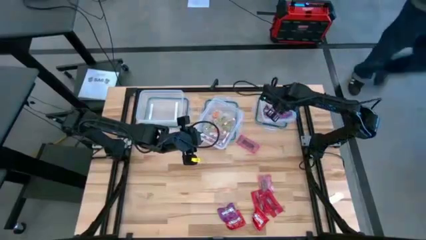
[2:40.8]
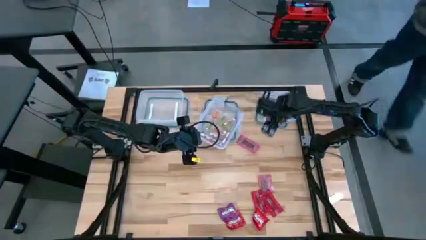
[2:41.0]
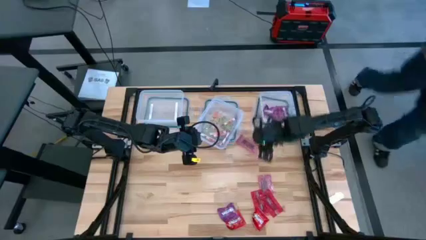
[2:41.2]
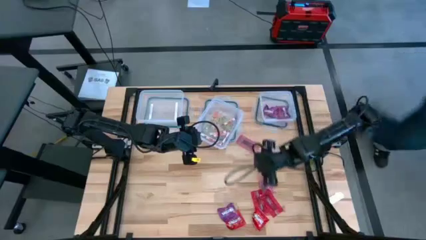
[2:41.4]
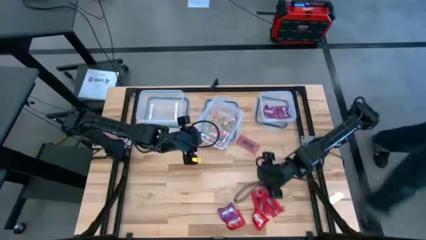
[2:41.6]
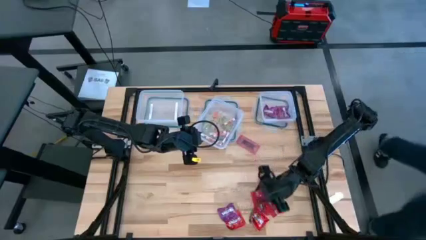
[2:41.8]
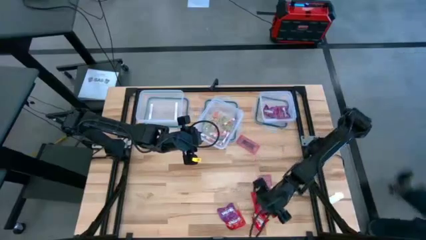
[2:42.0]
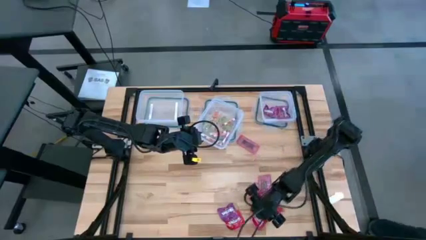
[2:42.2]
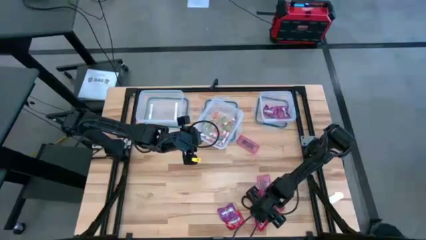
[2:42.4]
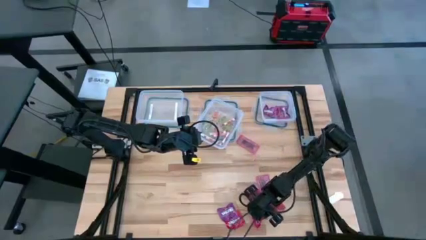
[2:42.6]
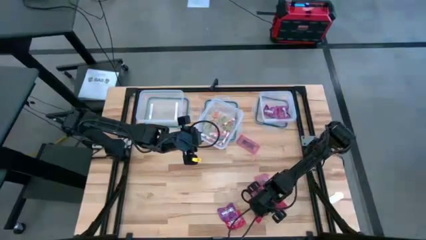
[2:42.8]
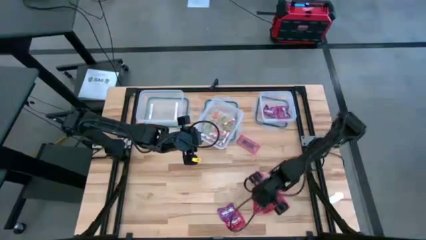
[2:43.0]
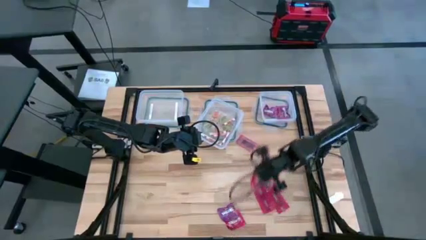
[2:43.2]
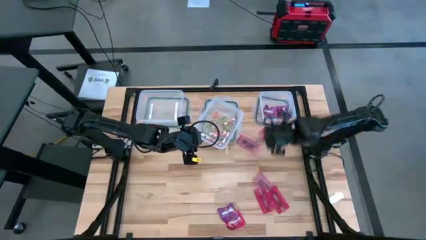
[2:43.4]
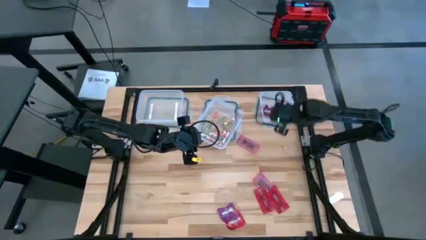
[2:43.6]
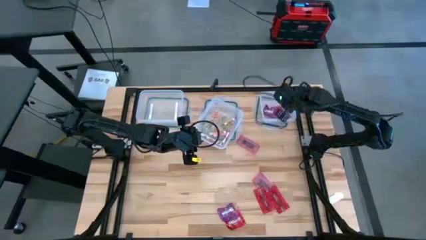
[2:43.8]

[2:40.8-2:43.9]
Task: Sort candy
Put the bottom center red candy into the right transparent bin

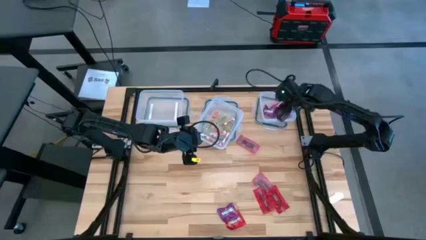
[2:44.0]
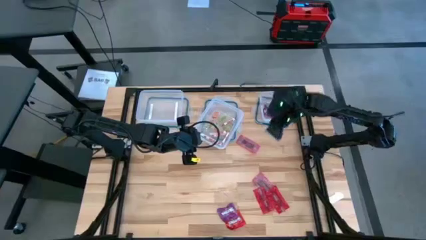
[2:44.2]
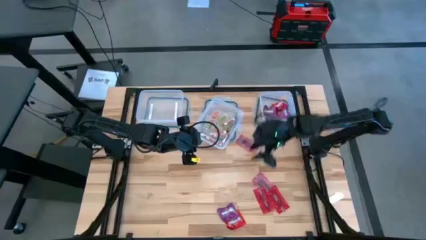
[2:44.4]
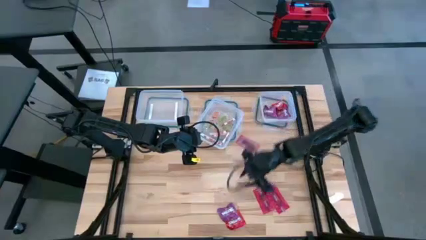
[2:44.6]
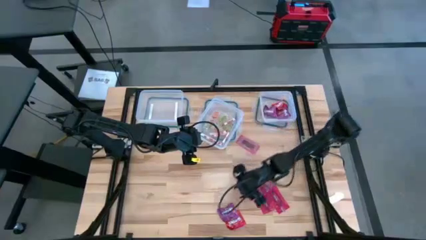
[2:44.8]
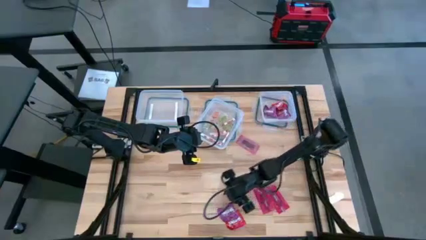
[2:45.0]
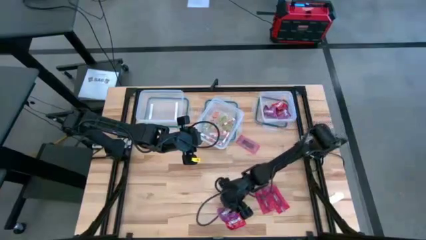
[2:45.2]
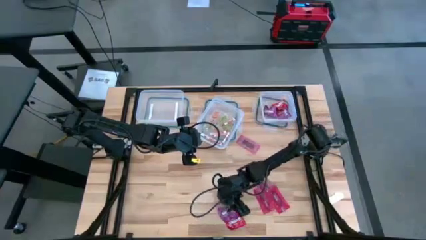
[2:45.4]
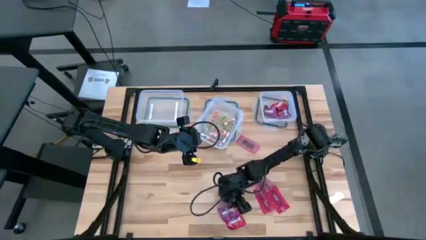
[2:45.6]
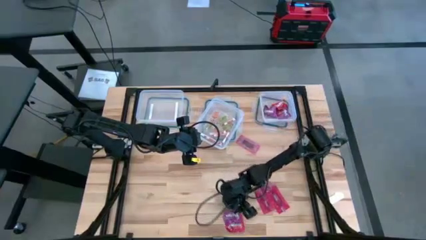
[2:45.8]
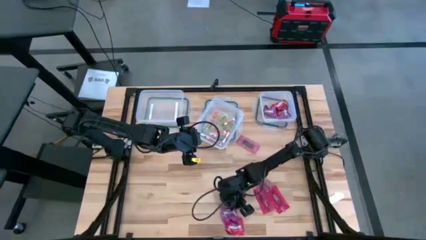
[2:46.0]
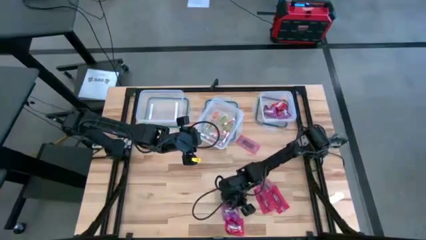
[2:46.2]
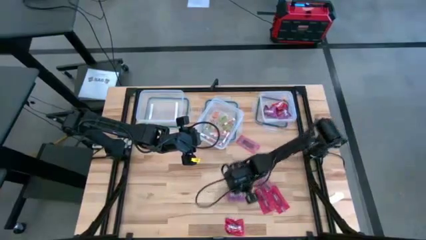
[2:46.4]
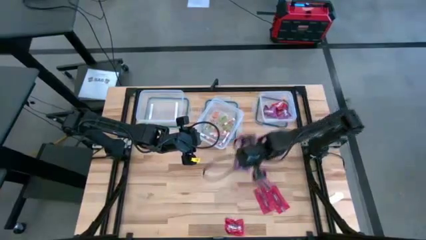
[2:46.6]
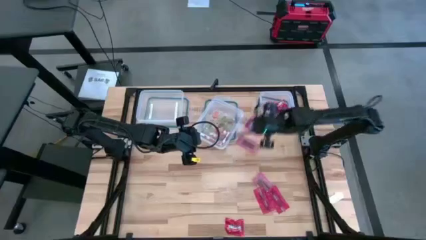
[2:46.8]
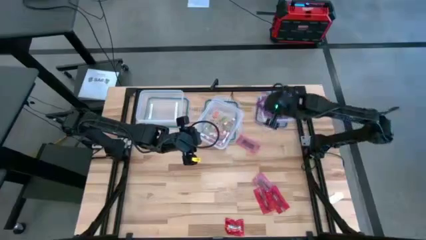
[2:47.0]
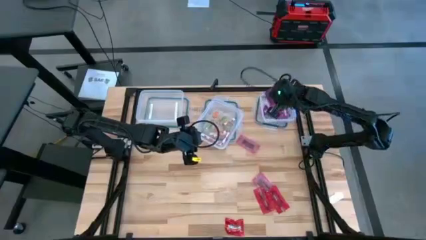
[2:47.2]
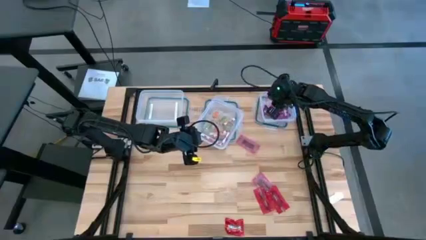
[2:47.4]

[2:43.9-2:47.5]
Put the violet candy into the right transparent bin

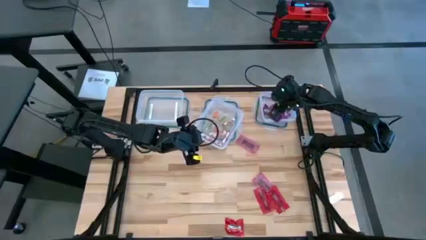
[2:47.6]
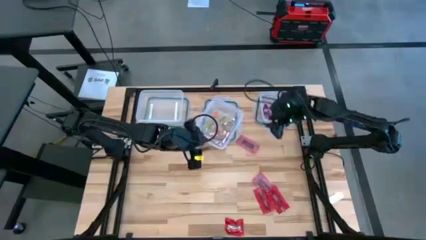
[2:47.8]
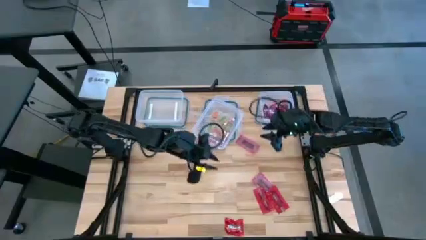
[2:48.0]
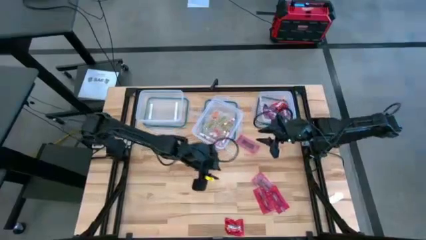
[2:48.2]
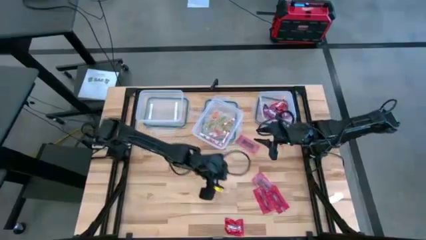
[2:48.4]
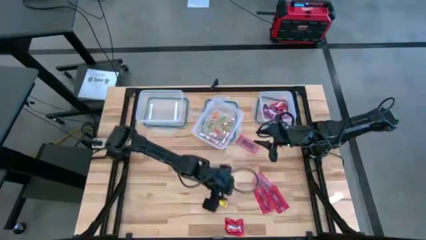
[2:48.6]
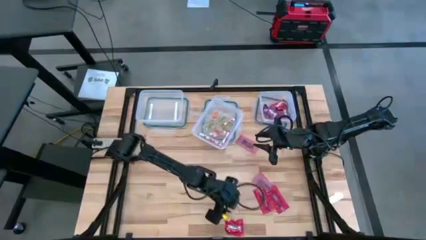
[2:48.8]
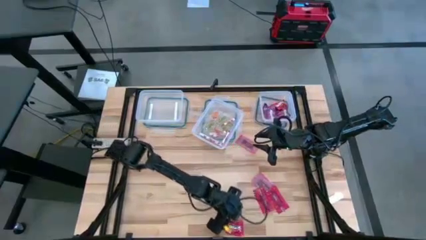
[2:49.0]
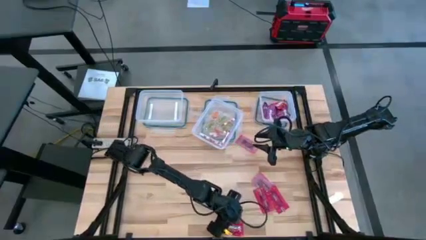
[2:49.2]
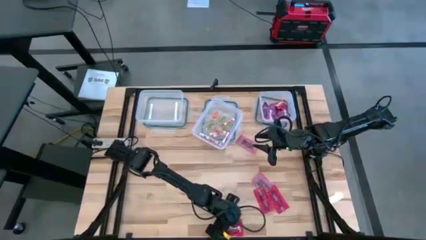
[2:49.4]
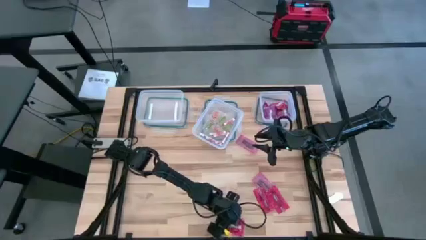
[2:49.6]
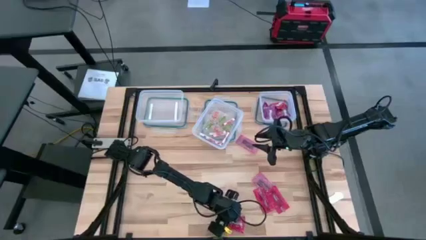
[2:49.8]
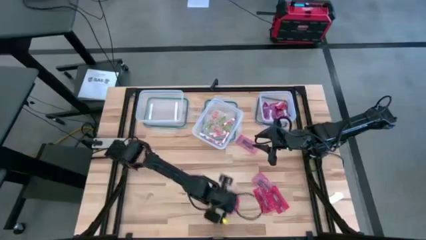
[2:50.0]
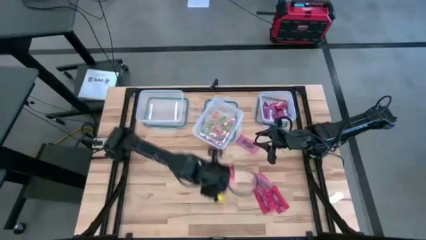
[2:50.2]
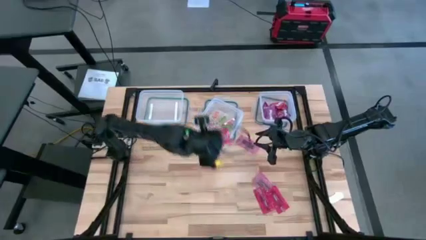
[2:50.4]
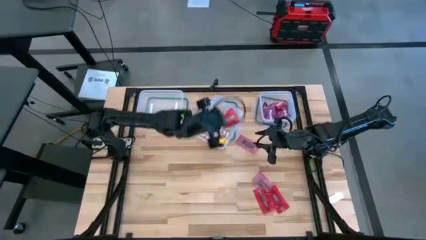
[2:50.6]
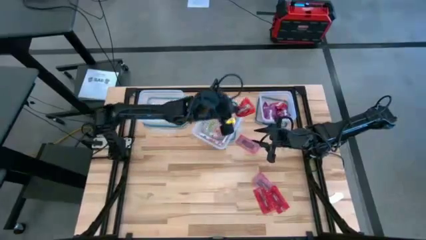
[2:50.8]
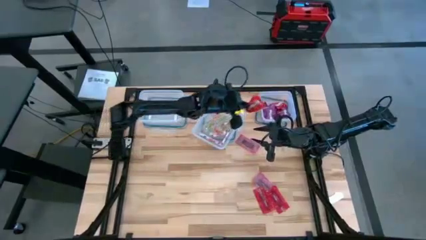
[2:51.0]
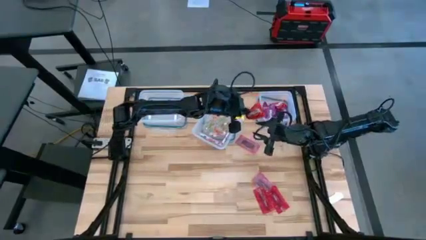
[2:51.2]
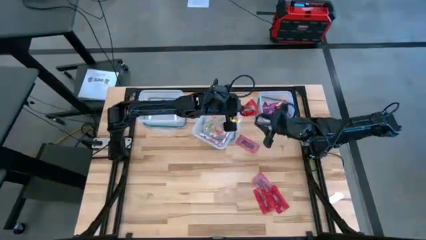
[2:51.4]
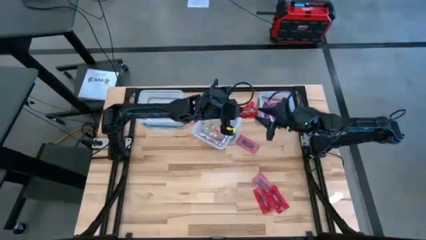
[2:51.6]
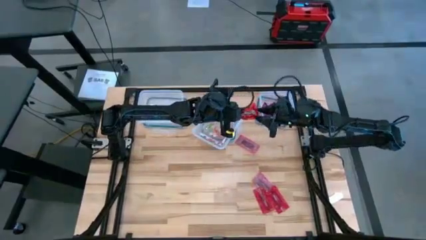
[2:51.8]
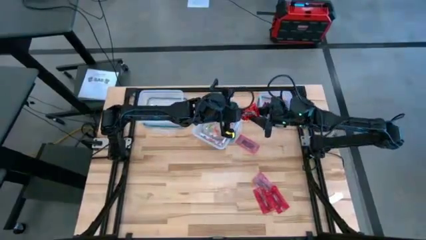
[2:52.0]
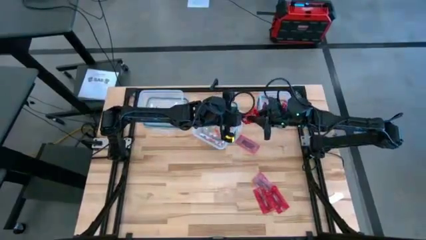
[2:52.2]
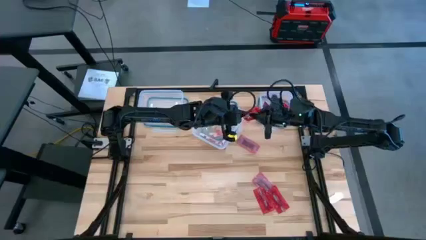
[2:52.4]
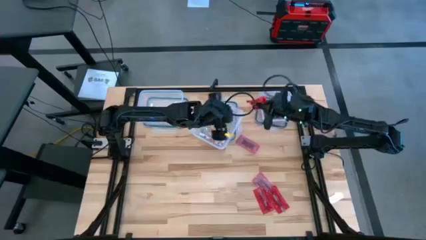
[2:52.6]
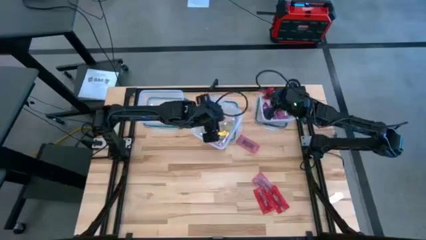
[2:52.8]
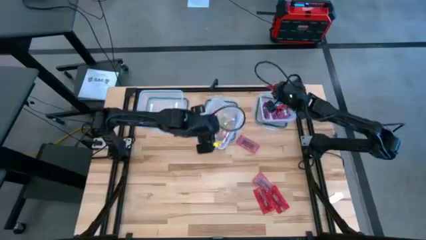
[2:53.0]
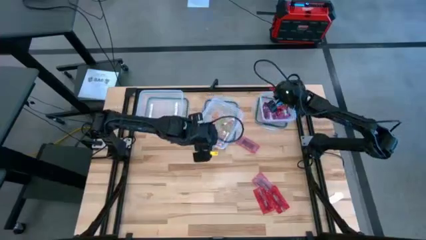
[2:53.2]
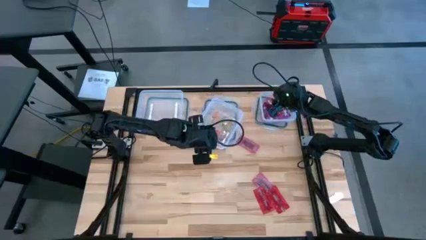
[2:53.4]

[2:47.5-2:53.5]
Put the middle left red candy into the right transparent bin

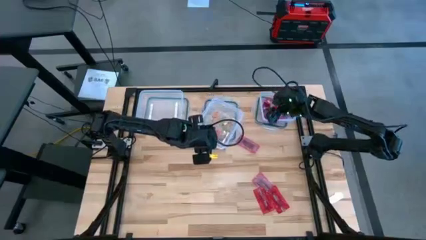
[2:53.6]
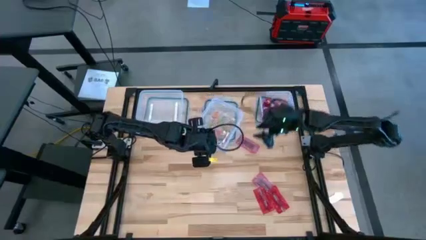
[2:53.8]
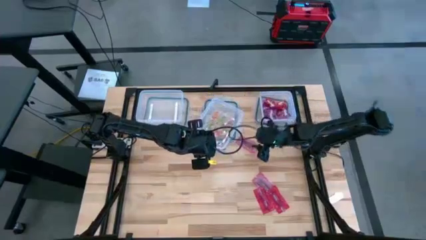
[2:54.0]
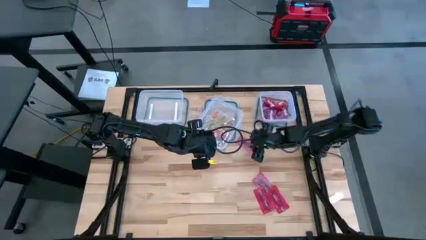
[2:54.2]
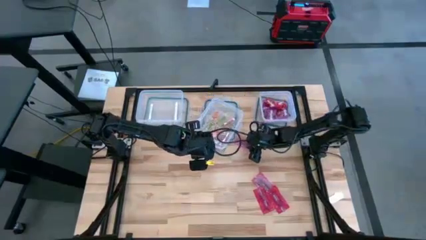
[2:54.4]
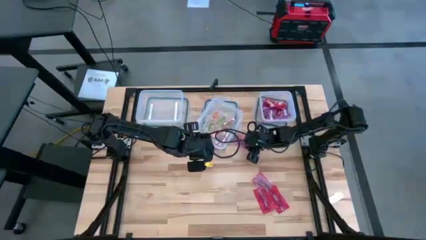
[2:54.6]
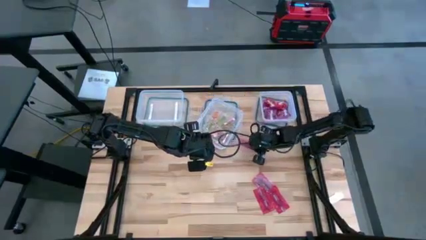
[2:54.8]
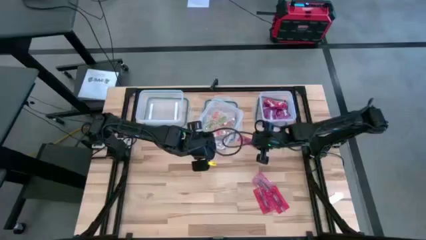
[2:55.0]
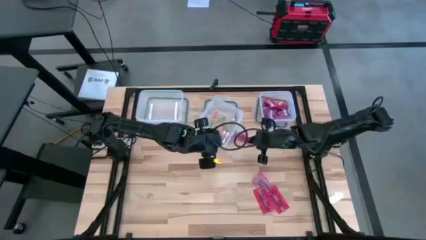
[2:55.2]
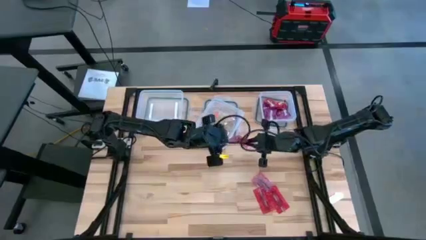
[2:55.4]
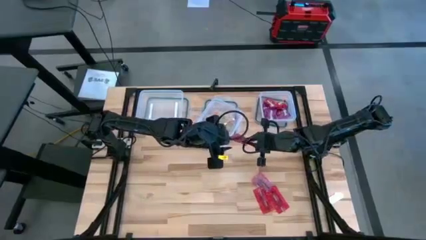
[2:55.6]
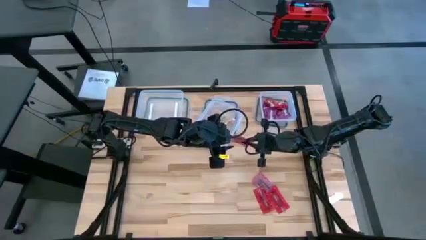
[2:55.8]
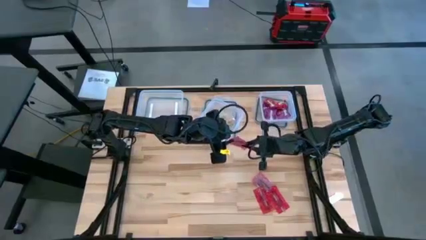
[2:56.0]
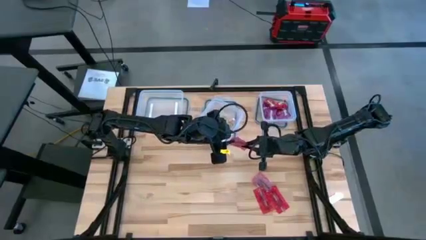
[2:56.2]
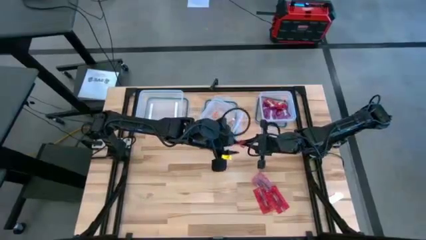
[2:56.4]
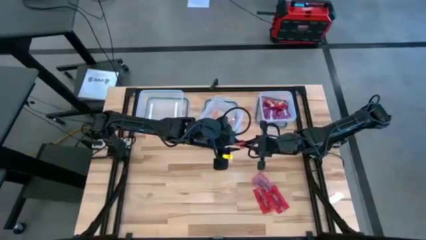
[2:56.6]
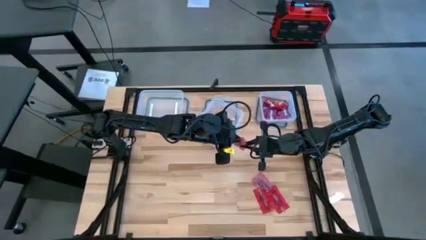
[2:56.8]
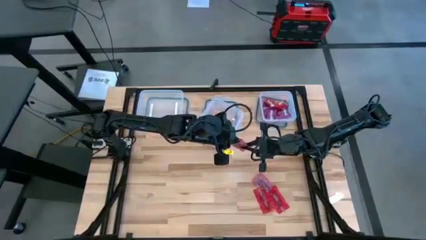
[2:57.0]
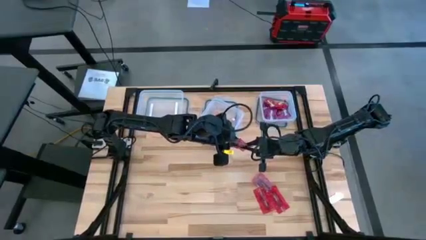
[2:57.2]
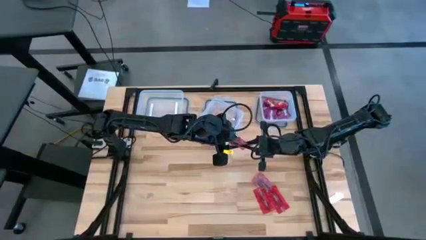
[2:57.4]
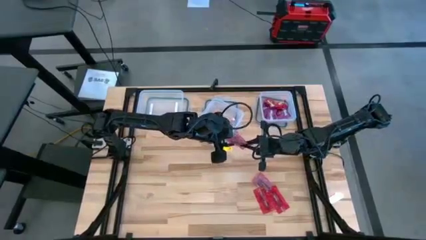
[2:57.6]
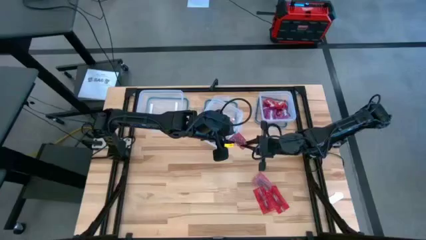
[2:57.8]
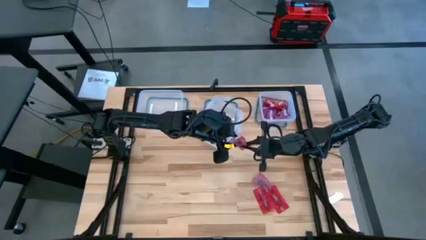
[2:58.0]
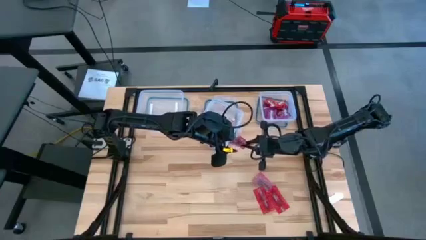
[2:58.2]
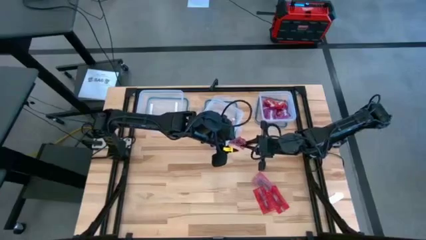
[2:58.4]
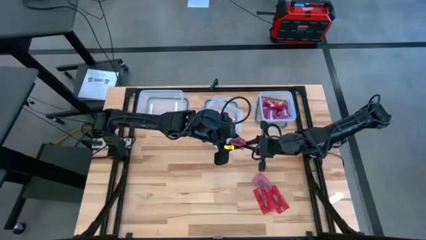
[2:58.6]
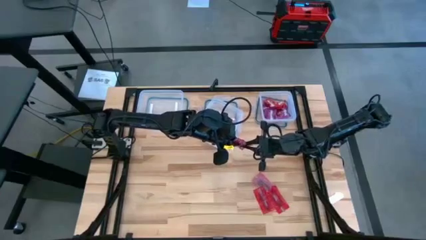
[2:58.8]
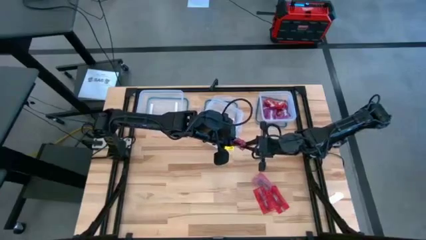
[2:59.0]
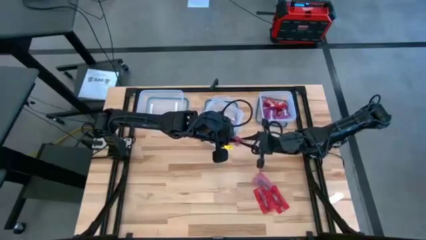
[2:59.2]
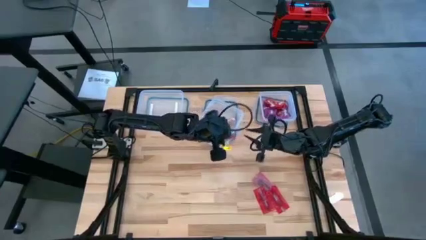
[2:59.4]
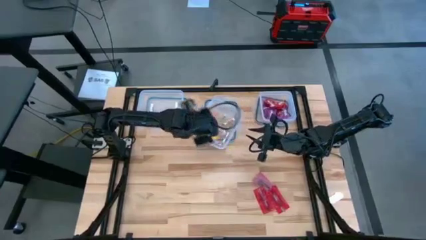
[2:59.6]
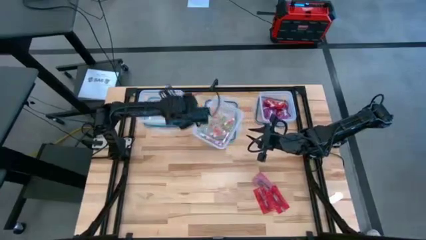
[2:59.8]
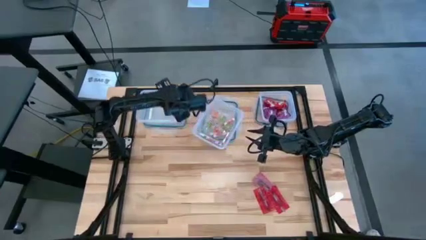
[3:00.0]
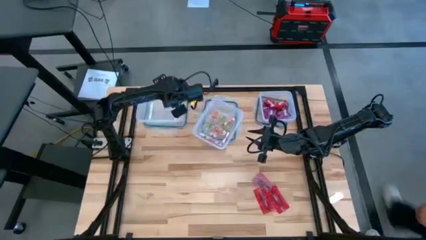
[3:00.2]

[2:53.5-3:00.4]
Put the top right red candy into the left transparent bin
